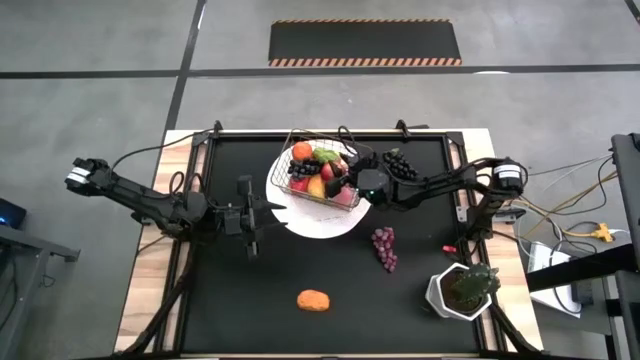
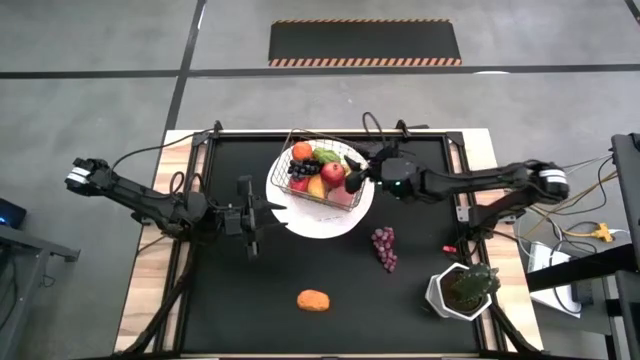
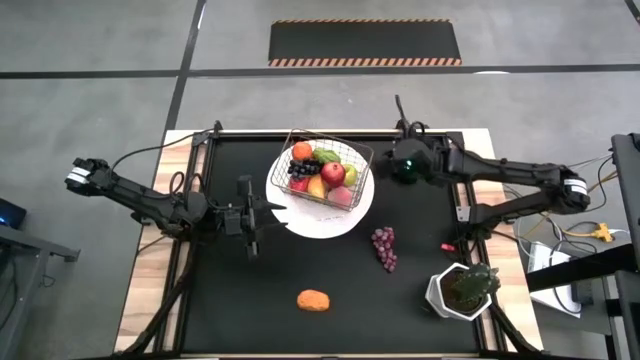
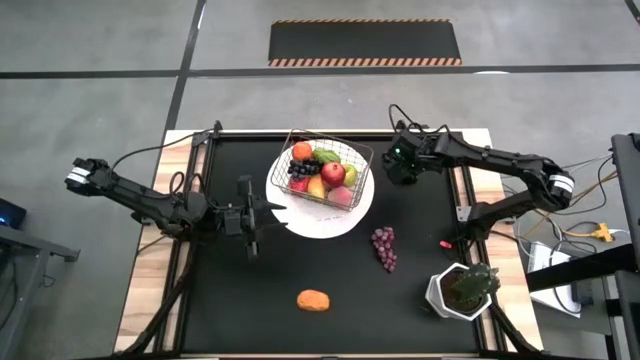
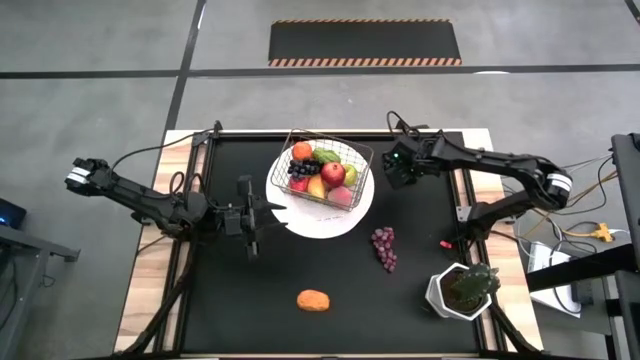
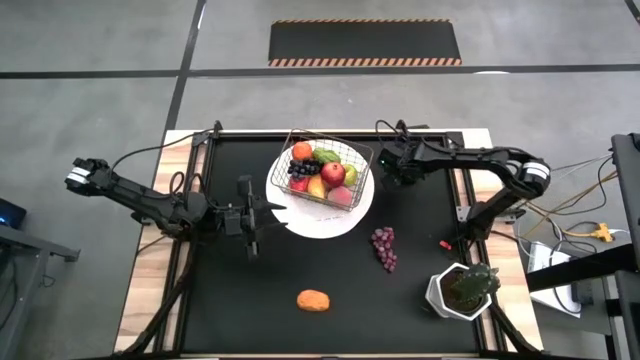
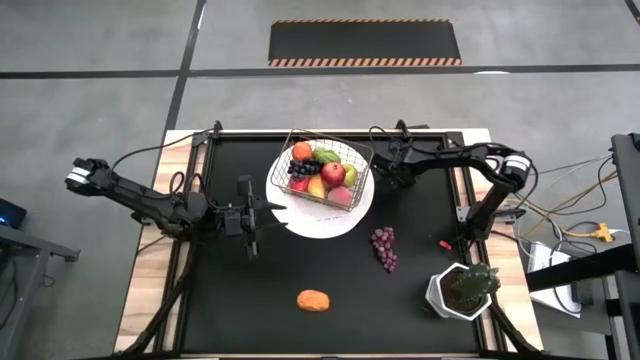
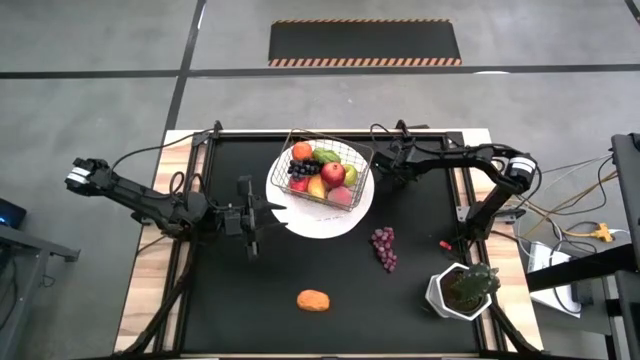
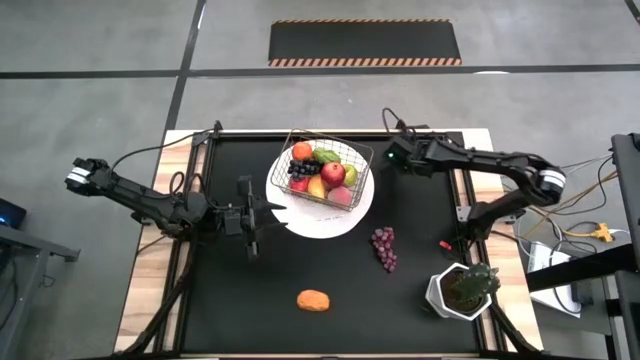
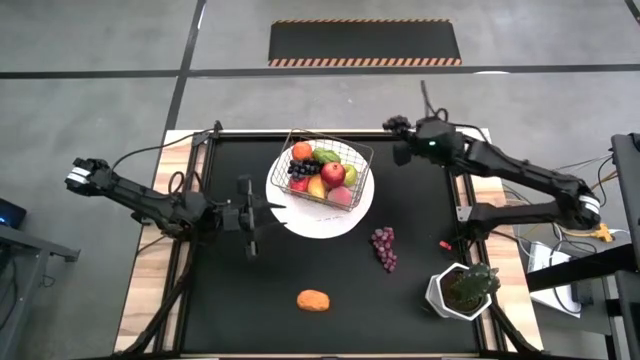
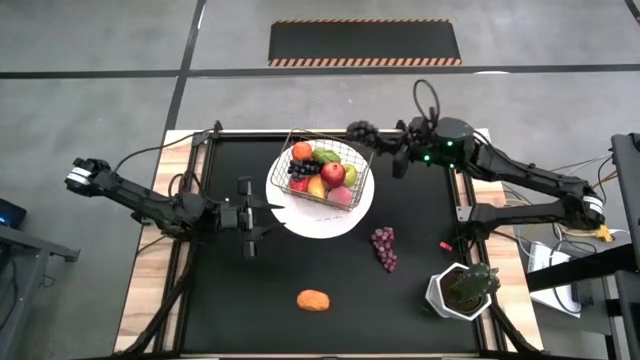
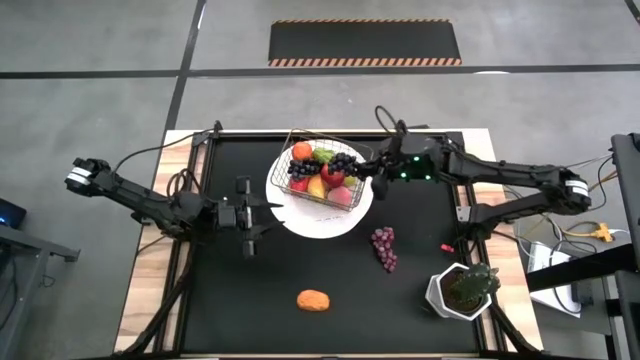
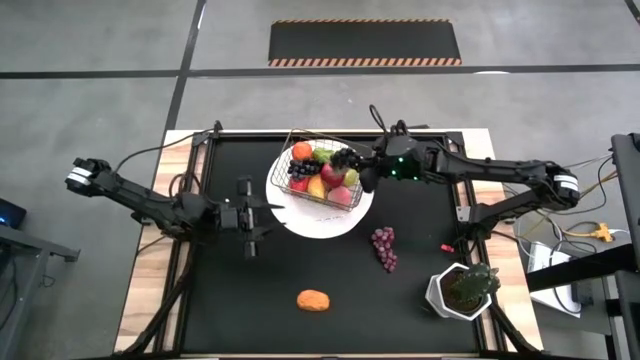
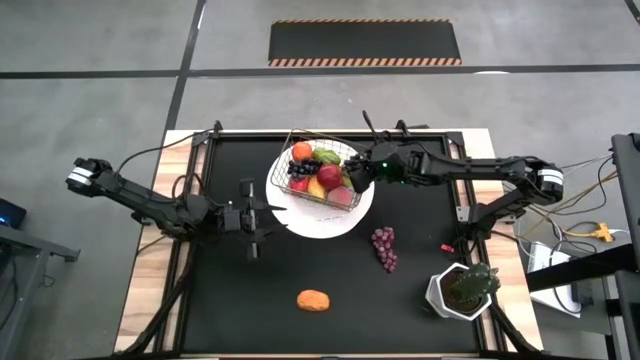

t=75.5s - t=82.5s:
Task: Build produce basket
Put the black grapes into the silver basket

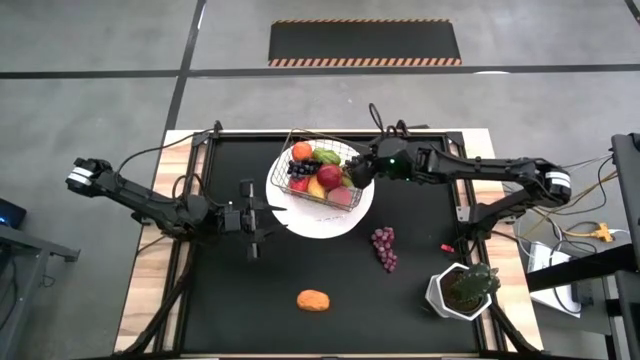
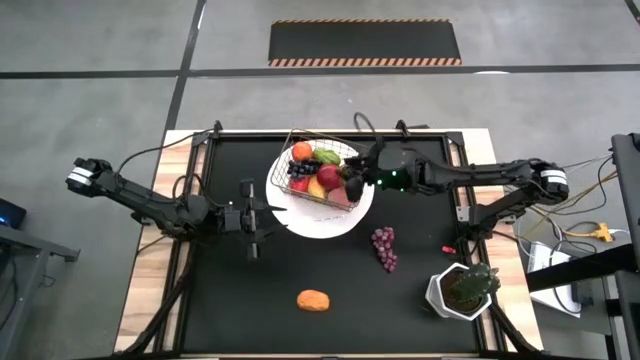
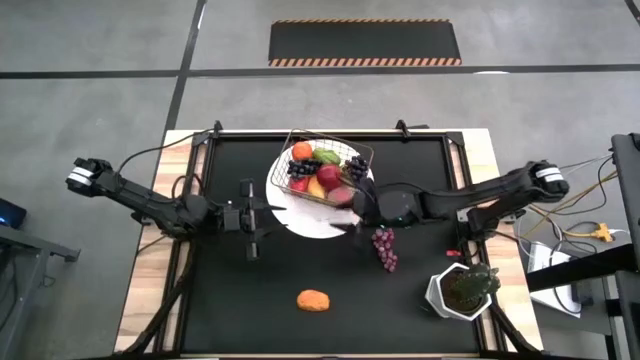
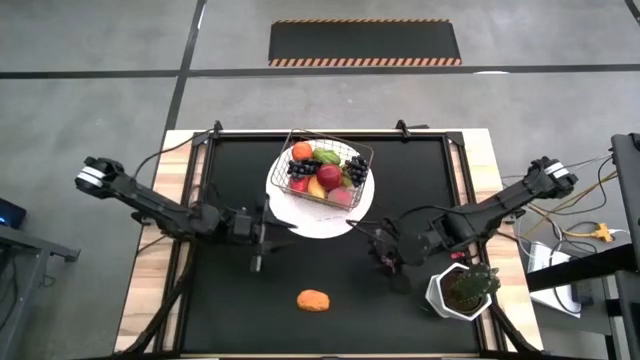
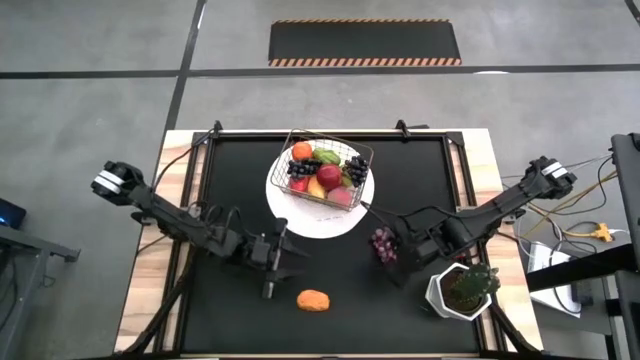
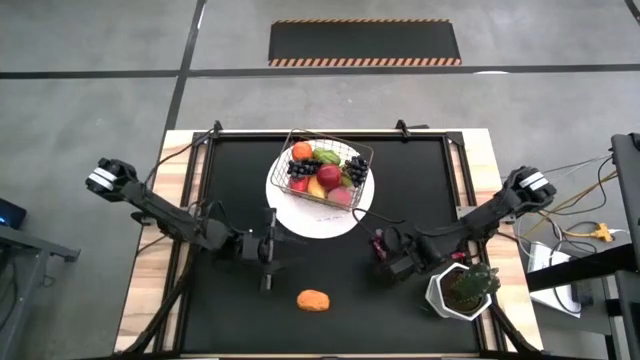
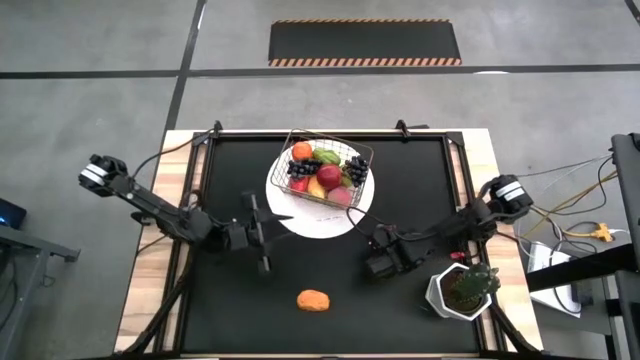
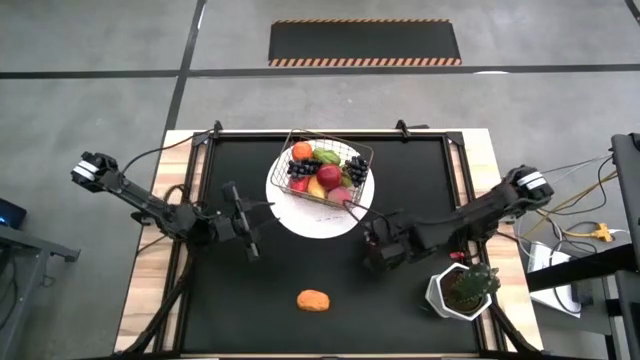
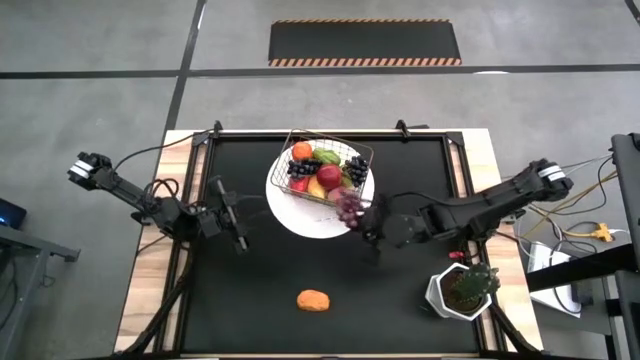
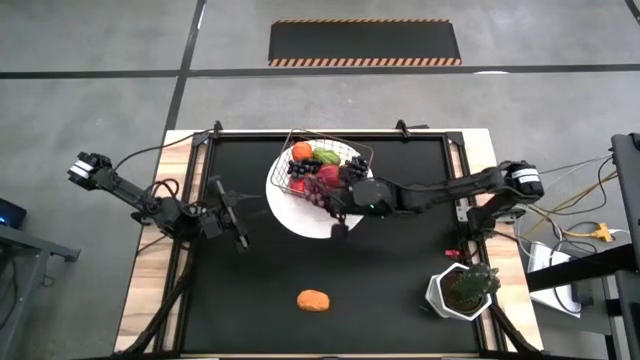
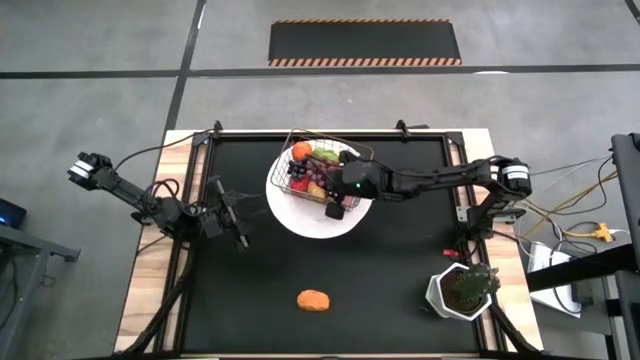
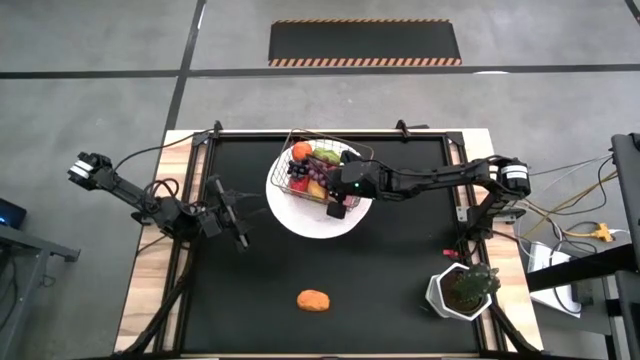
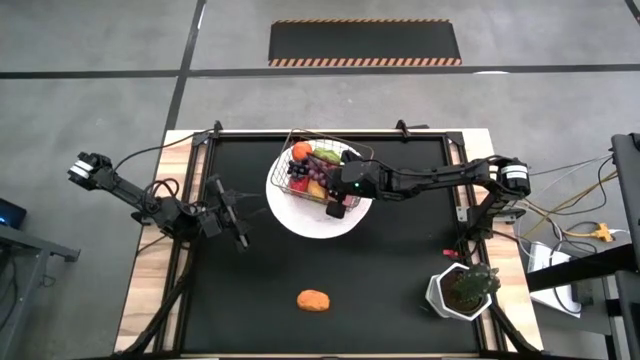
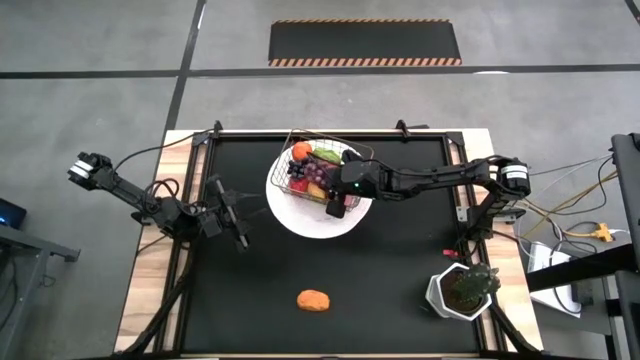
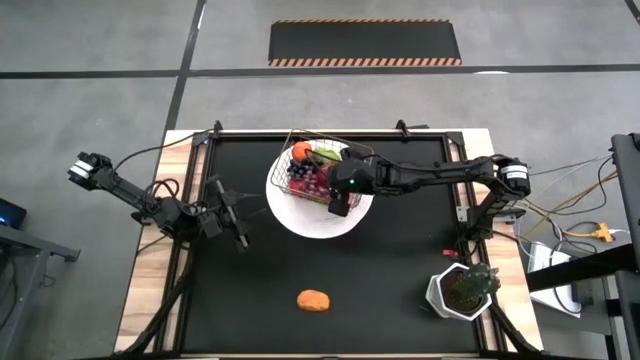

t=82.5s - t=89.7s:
Put the pink grapes into the silver basket

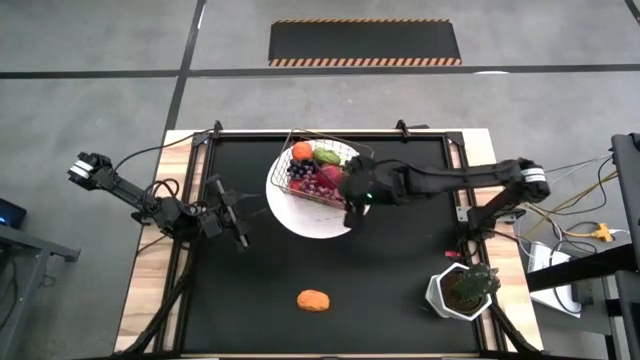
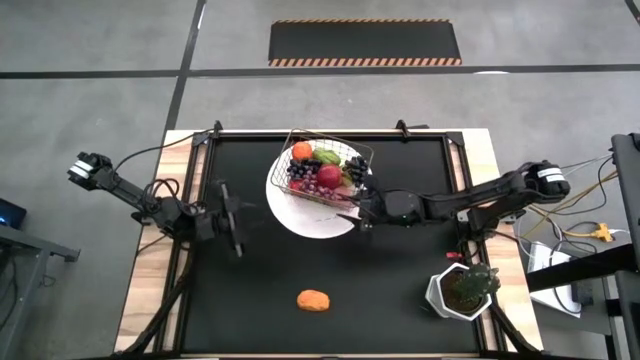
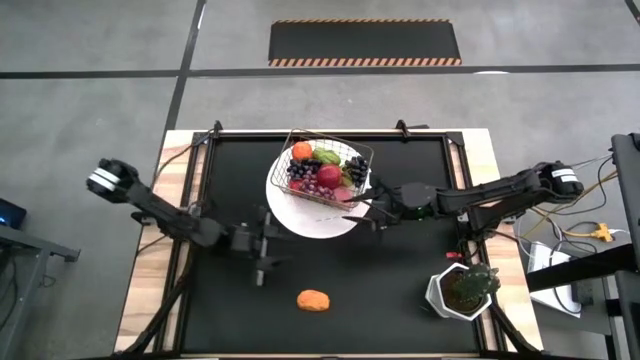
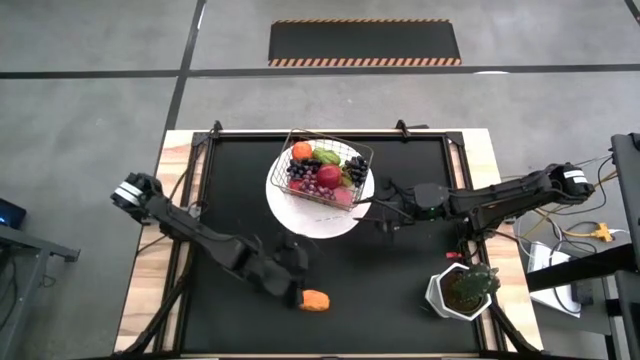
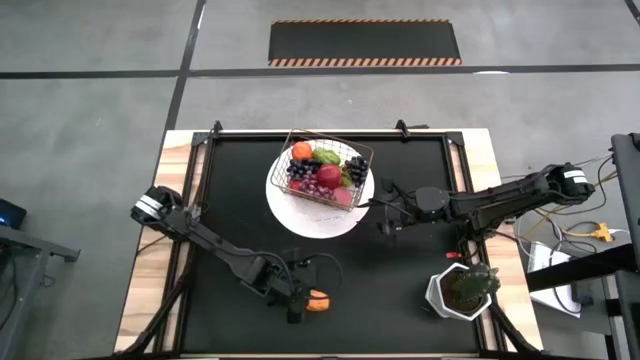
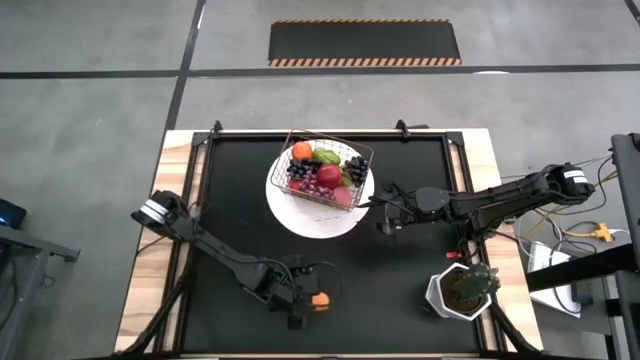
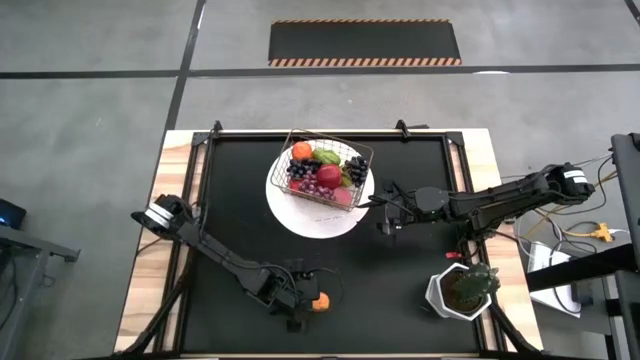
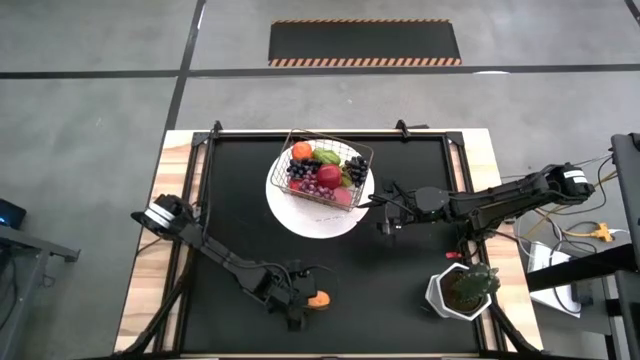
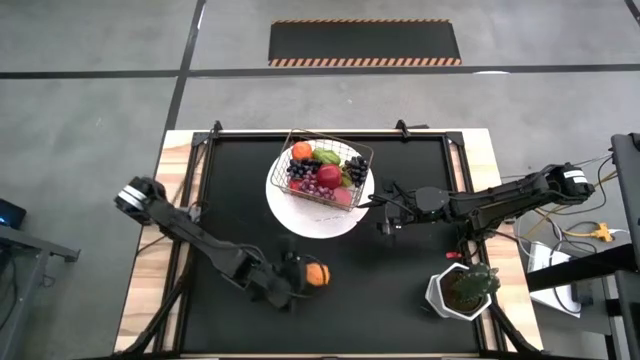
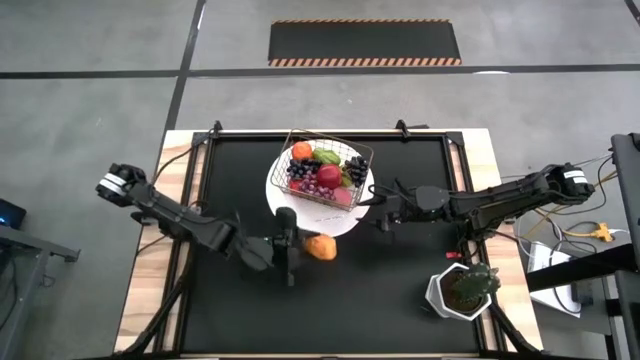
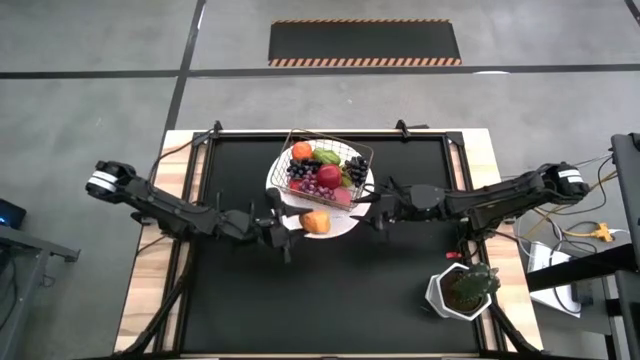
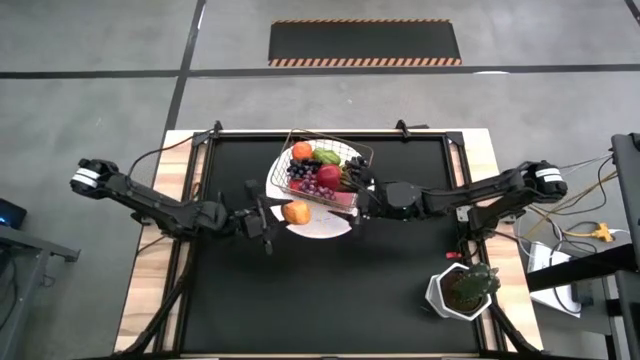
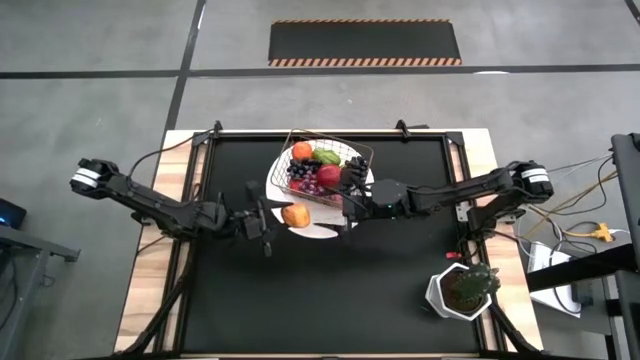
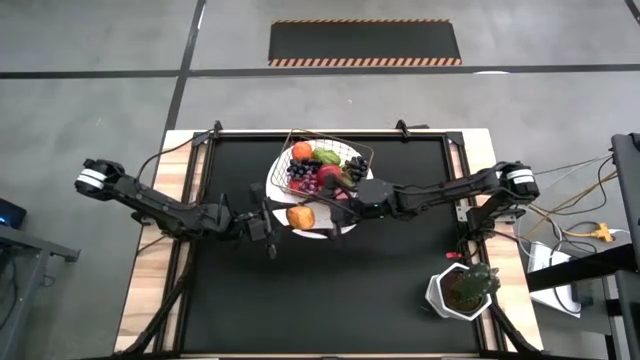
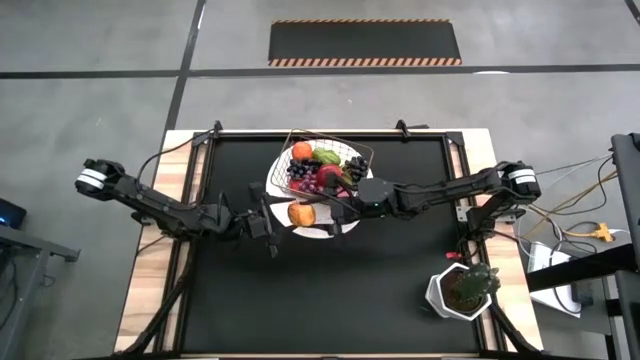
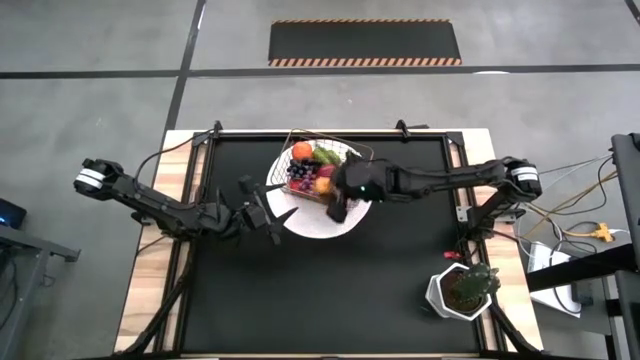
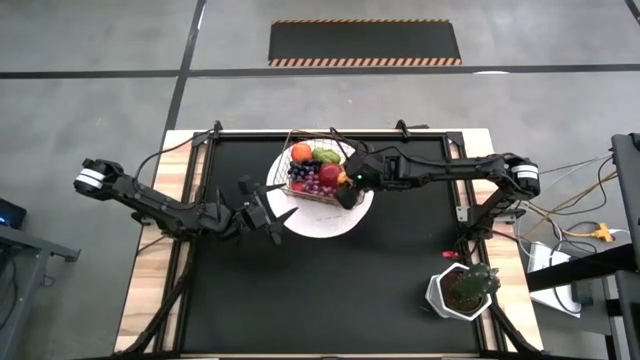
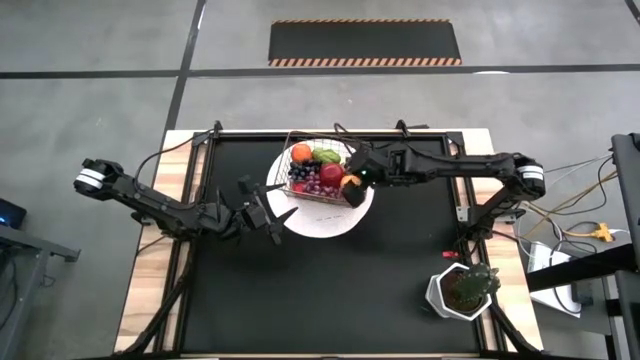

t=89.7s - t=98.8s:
Put the persimmon into the silver basket
